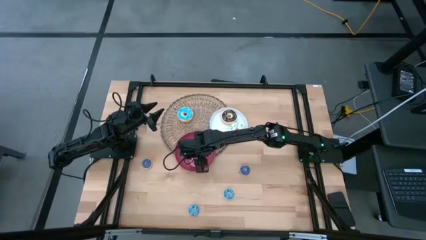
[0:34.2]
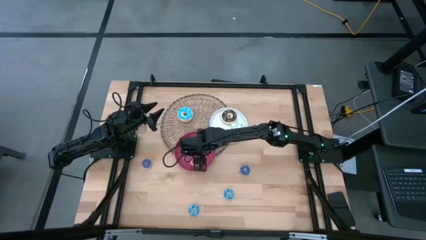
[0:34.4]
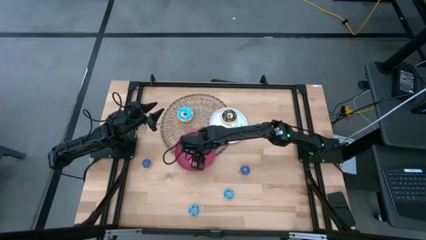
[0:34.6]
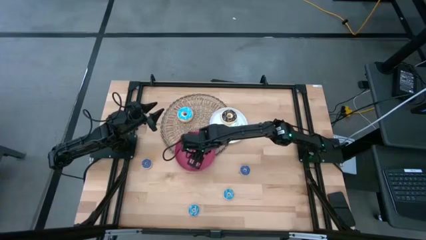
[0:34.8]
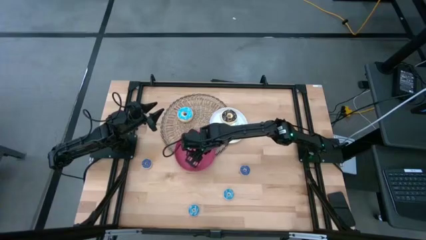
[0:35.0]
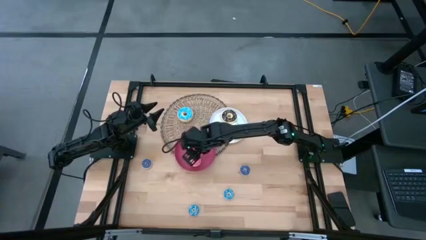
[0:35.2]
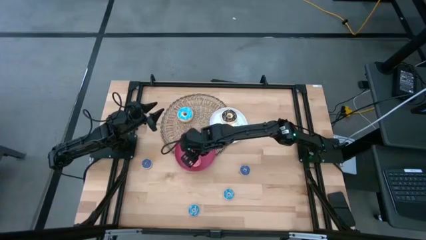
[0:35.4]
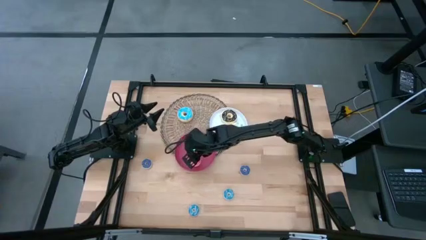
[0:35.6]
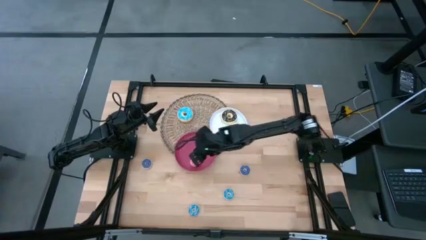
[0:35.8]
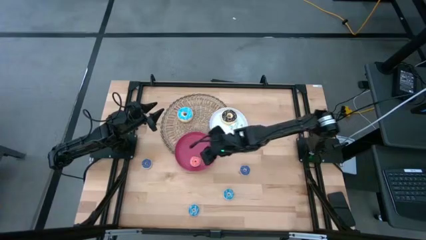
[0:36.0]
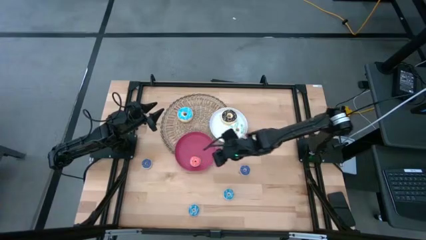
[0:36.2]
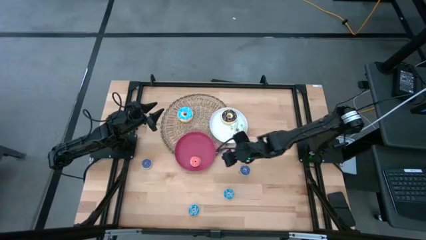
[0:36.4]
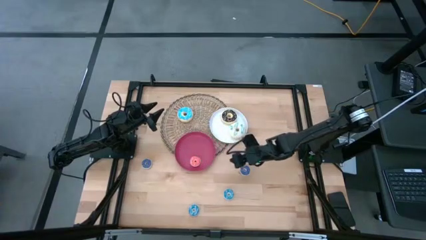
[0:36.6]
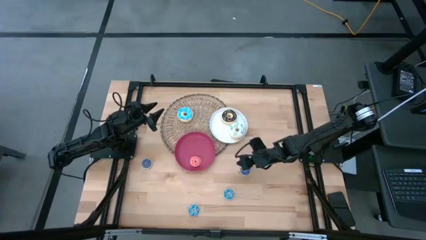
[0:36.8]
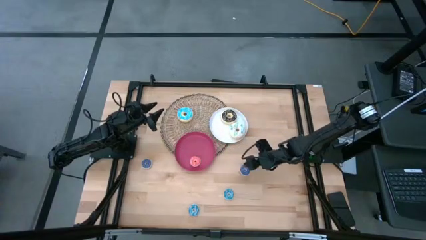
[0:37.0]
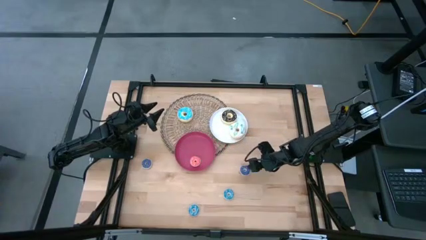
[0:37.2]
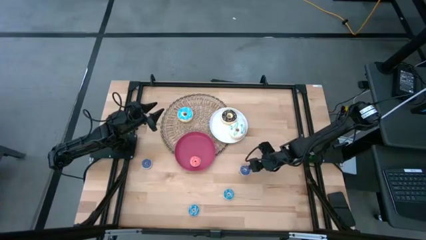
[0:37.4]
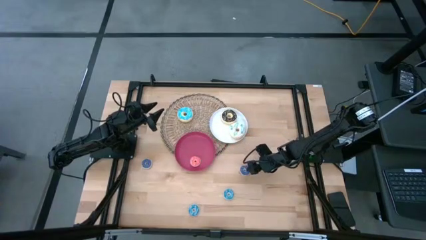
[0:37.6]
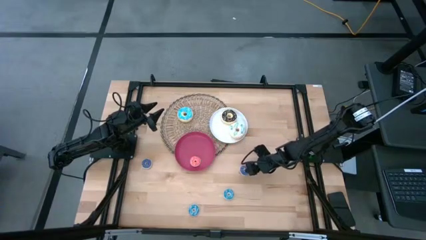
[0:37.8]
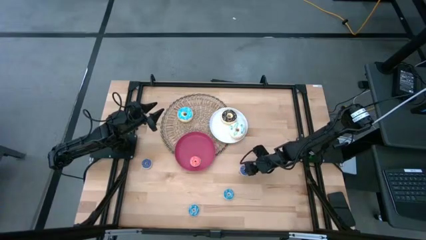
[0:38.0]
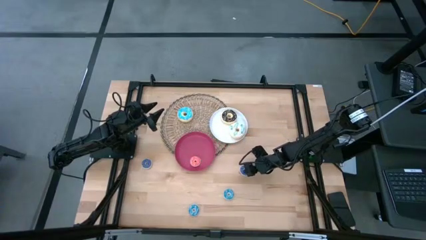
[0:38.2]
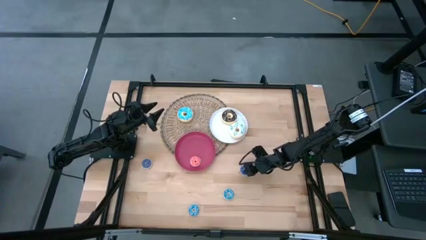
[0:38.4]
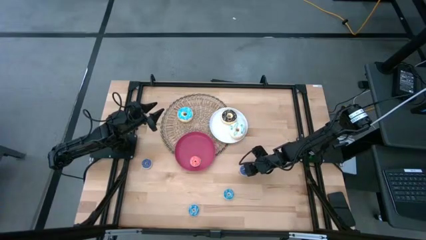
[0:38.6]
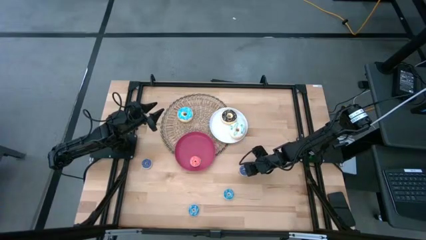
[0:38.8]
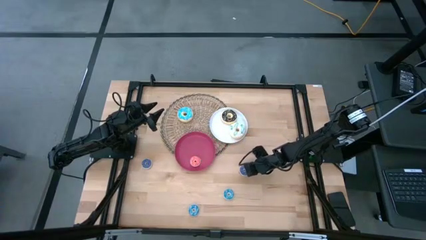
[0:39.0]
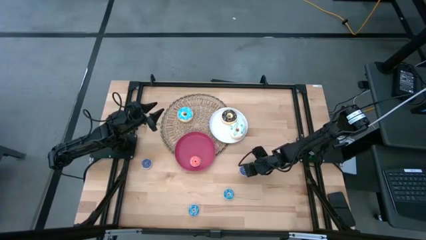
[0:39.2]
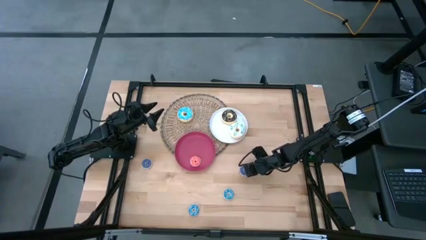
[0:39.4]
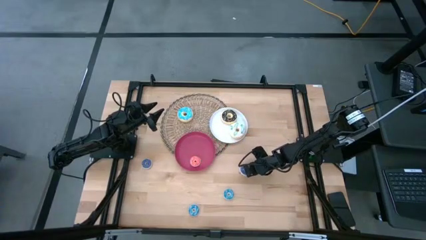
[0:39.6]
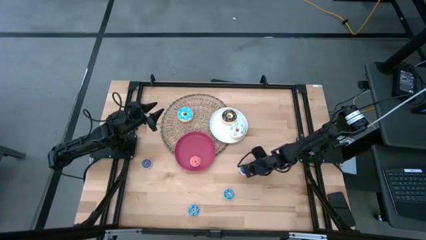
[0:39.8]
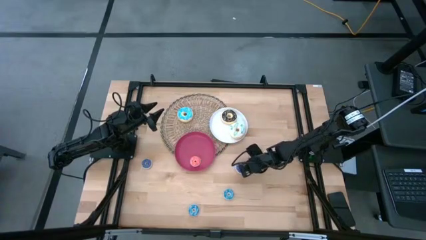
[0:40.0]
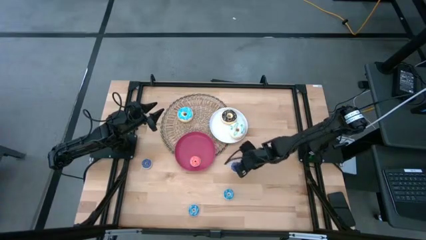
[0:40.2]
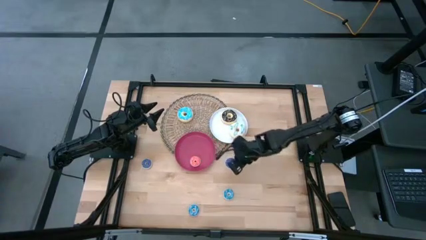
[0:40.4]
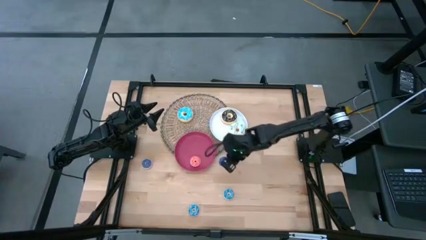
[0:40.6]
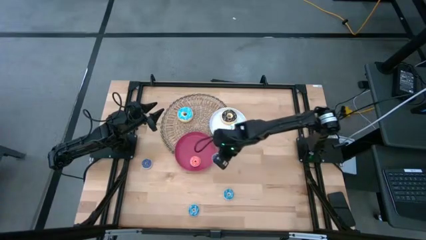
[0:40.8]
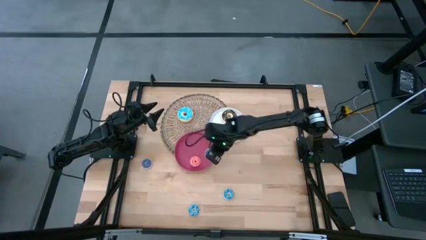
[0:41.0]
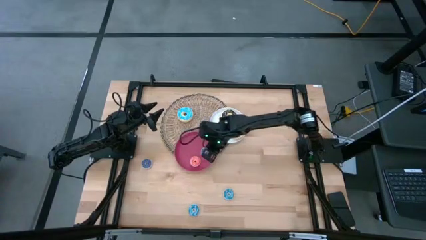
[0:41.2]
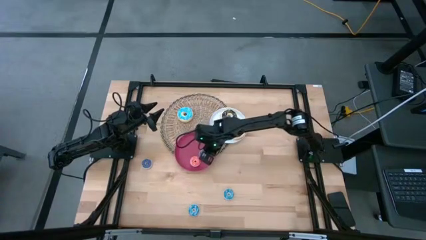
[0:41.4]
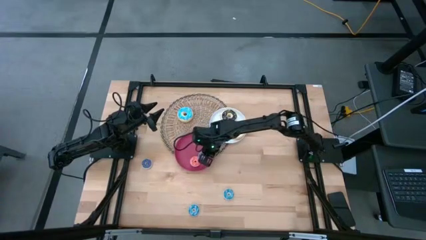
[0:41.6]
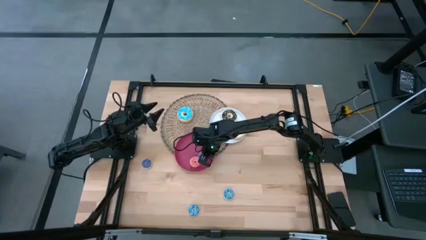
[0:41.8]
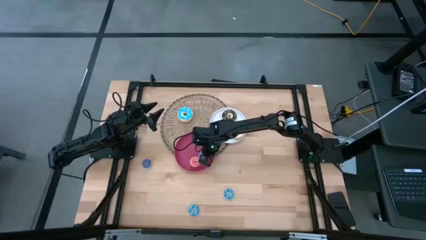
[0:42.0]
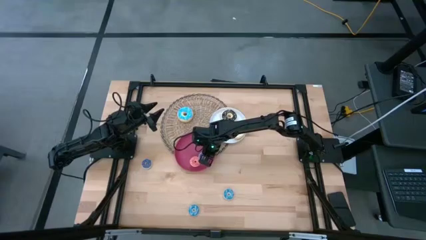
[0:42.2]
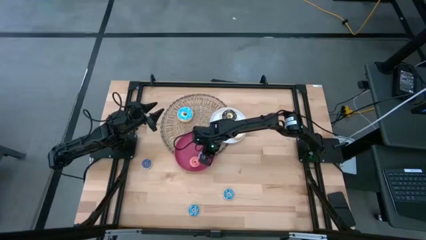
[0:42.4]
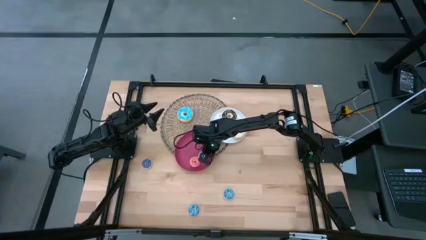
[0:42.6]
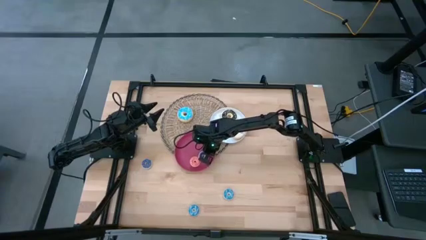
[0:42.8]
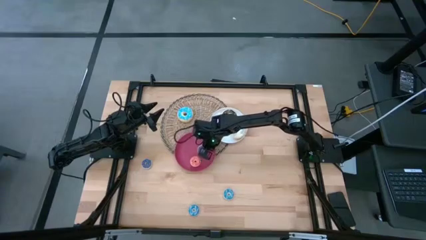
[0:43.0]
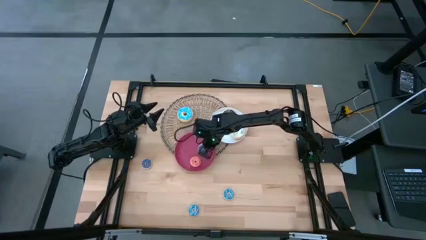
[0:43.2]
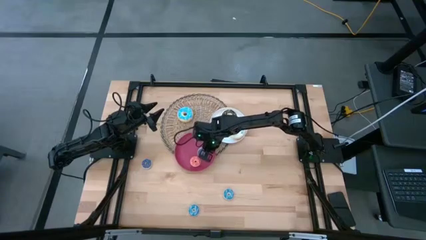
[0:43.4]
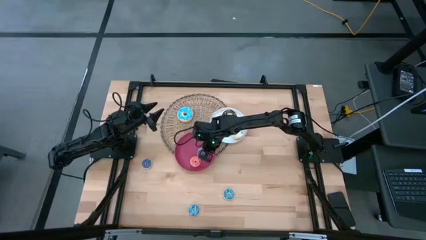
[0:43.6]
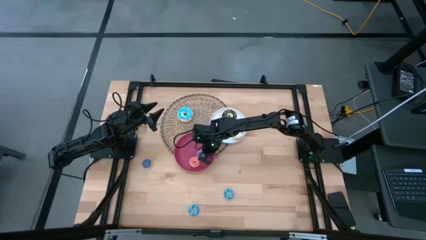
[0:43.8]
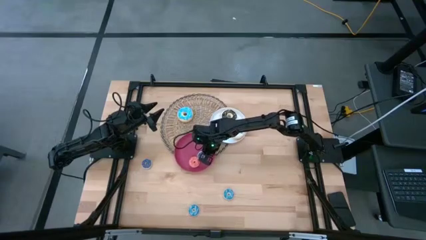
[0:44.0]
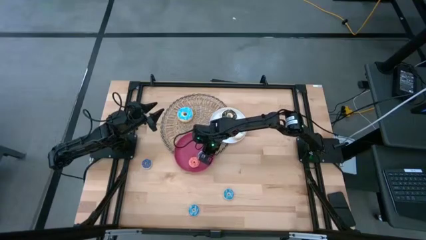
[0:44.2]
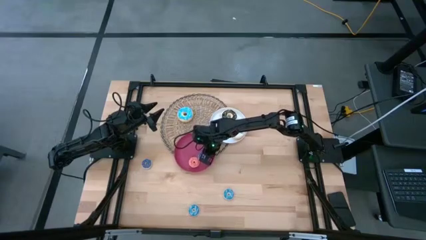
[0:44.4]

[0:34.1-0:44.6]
Task: Pick & Place donuts
Put the right blue donut on the pink plate

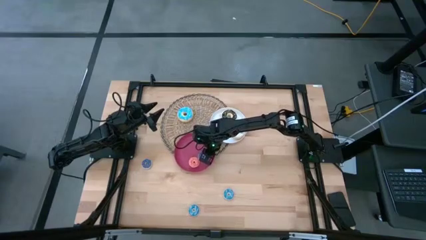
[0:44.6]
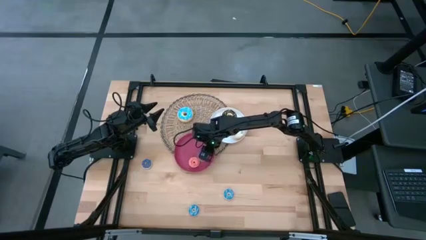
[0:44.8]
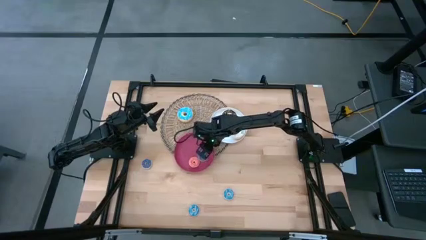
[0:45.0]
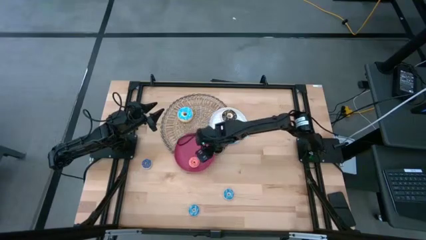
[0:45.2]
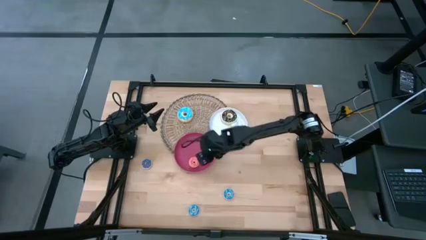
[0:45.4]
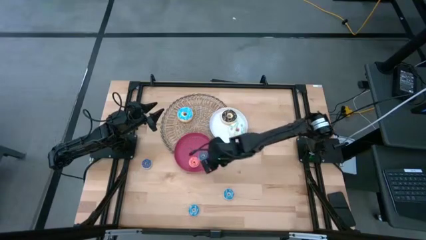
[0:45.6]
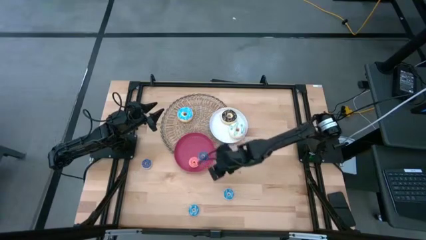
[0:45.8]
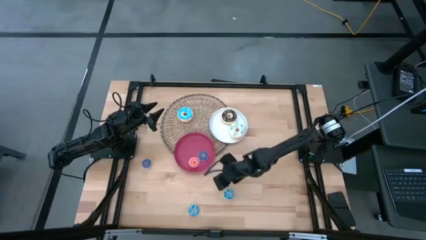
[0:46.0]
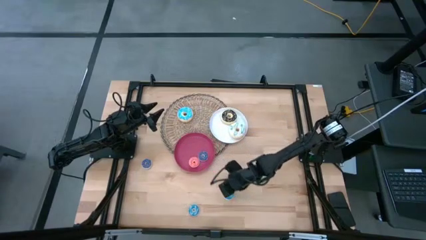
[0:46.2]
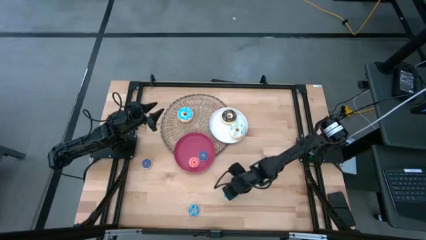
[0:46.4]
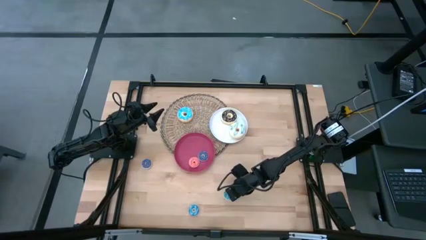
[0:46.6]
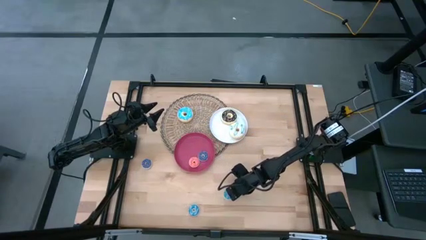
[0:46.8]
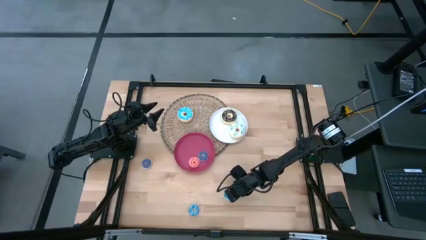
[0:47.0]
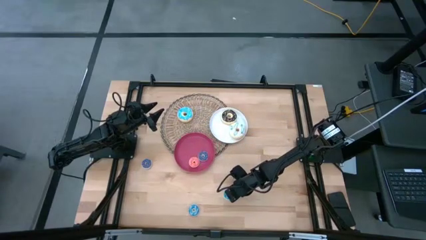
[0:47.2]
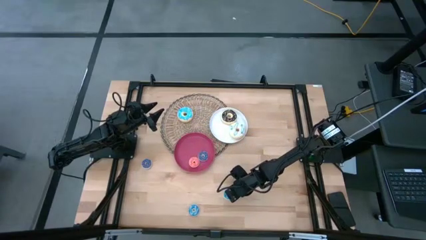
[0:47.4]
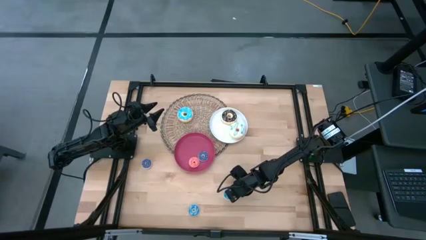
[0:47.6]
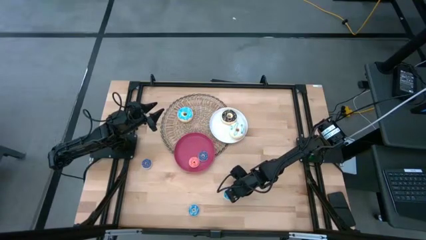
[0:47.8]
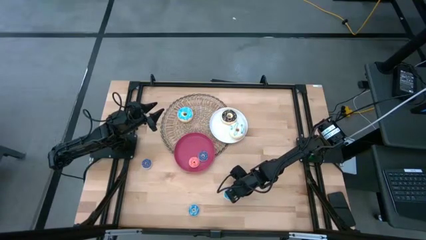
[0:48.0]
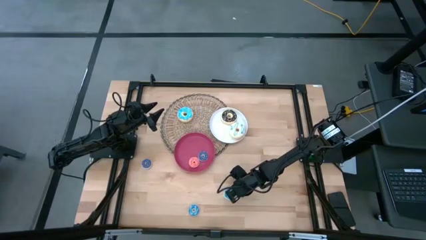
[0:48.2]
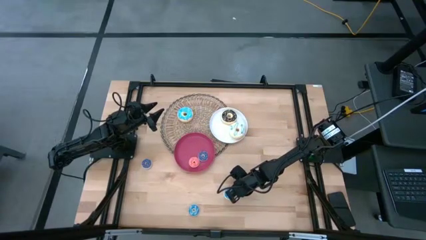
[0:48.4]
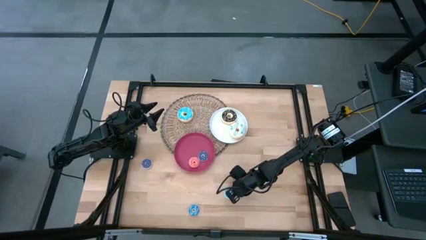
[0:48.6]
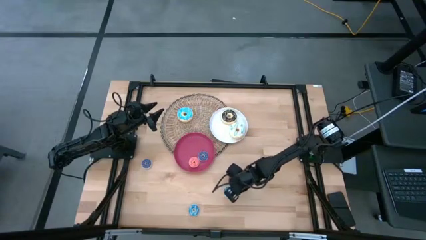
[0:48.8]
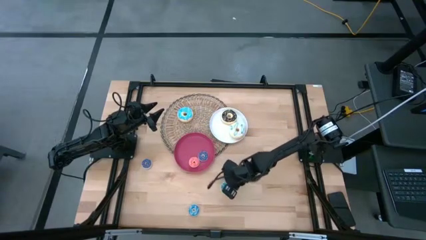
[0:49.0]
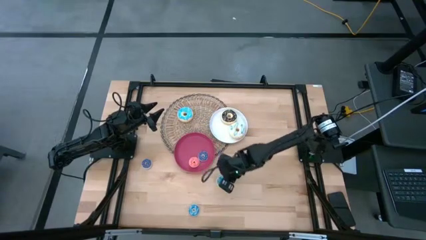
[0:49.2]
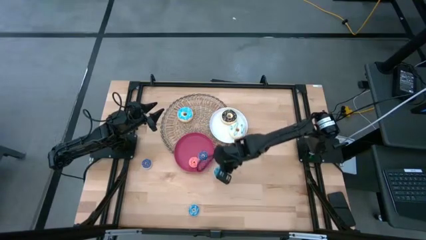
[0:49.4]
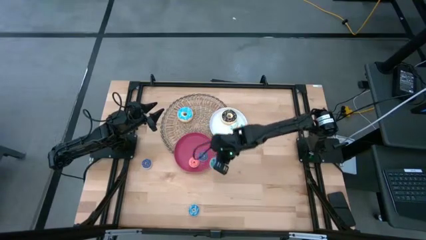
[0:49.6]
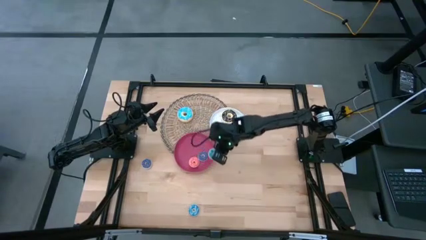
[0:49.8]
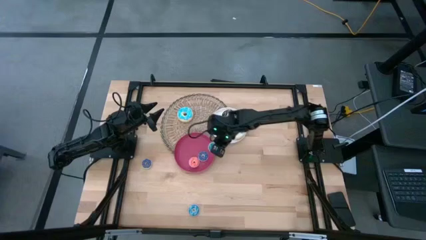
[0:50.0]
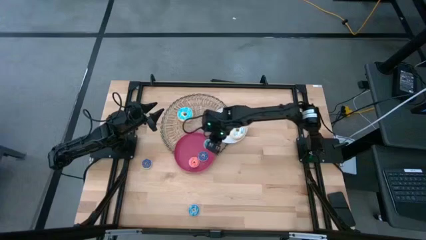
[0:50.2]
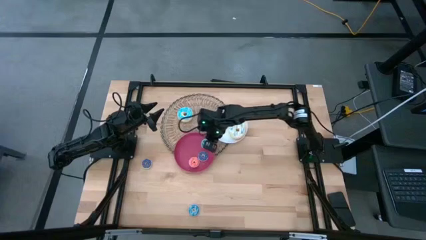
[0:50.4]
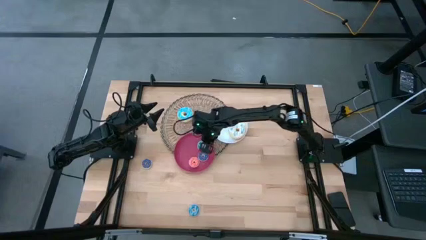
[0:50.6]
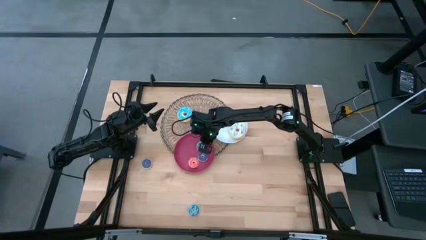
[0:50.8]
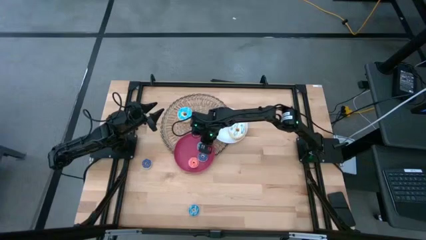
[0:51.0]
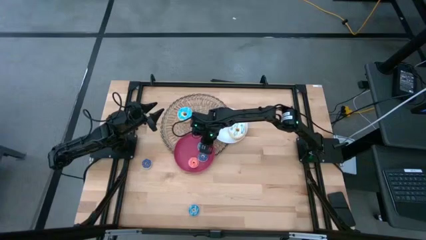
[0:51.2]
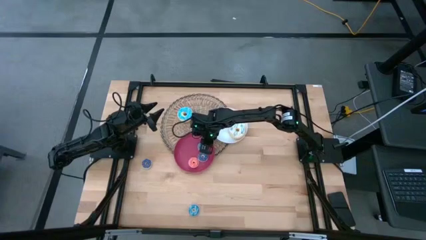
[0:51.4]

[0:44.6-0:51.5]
Put the right small light blue donut on the pink plate
